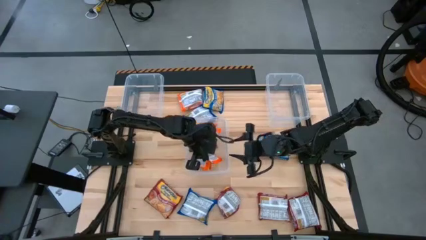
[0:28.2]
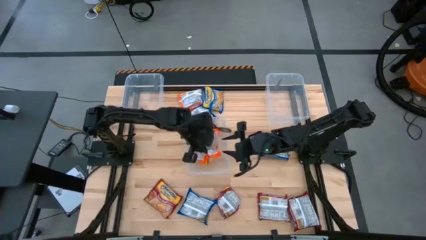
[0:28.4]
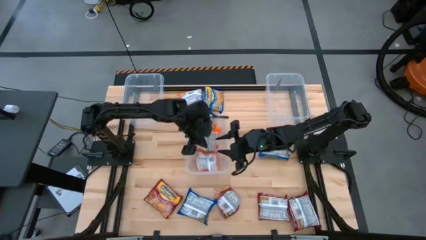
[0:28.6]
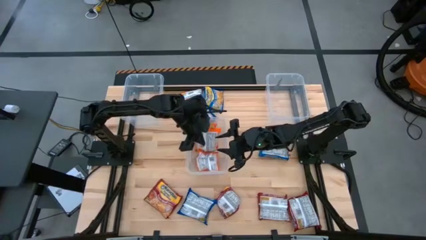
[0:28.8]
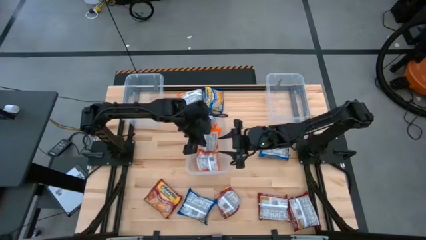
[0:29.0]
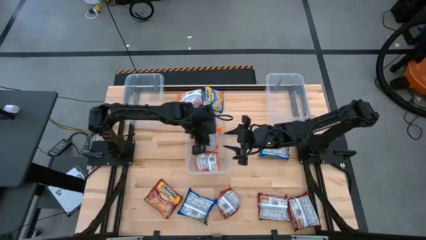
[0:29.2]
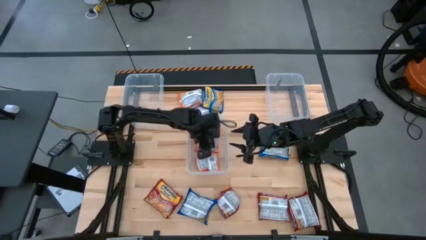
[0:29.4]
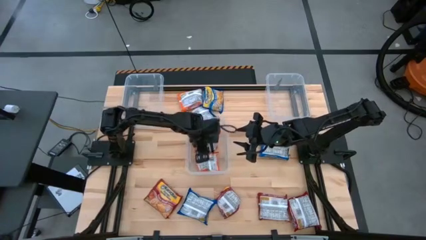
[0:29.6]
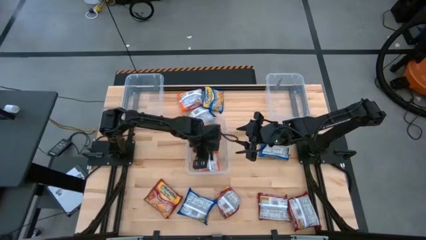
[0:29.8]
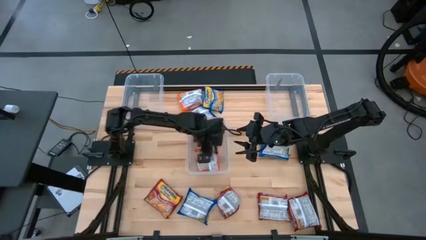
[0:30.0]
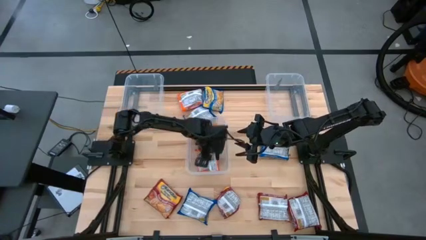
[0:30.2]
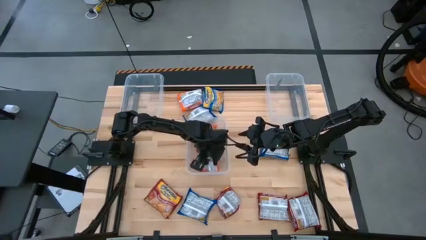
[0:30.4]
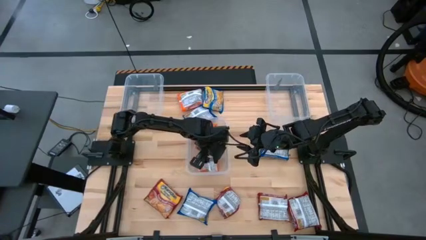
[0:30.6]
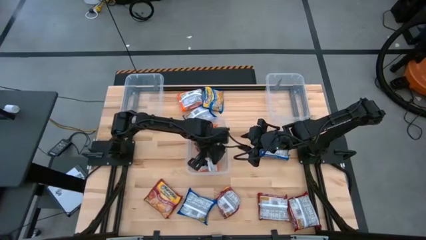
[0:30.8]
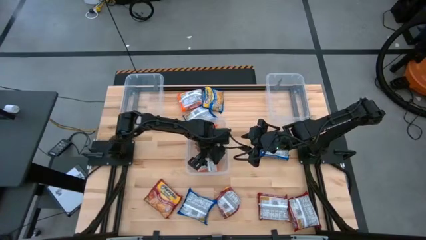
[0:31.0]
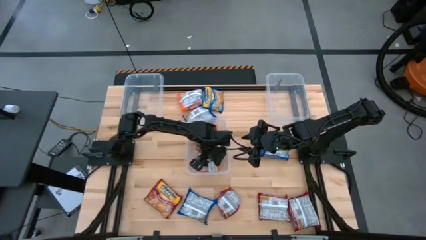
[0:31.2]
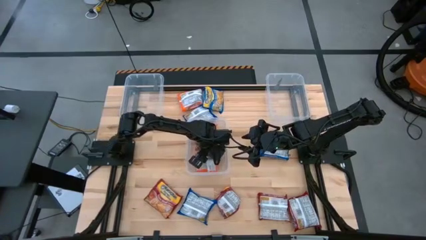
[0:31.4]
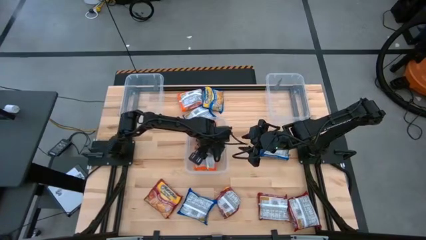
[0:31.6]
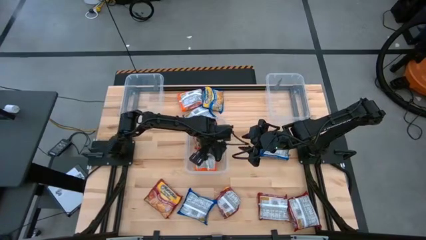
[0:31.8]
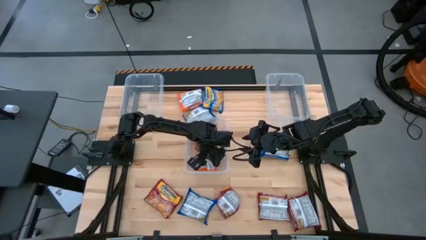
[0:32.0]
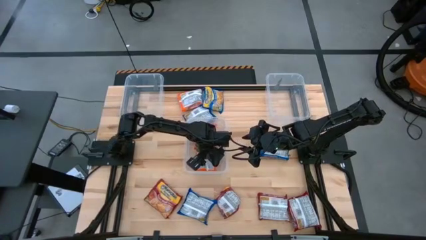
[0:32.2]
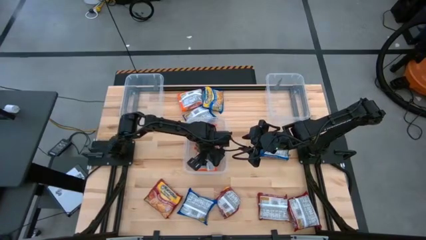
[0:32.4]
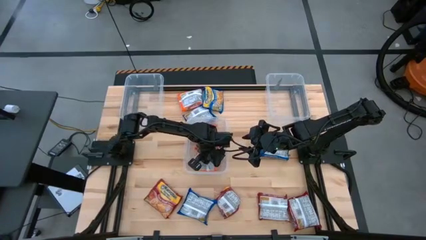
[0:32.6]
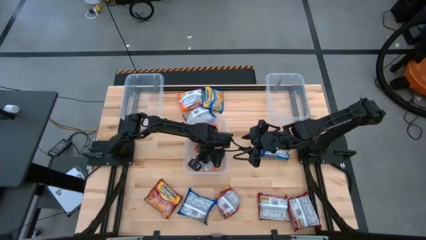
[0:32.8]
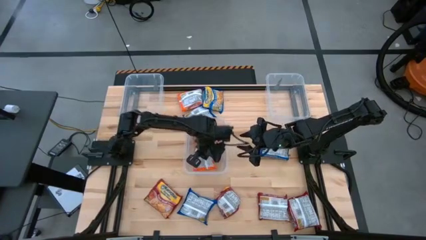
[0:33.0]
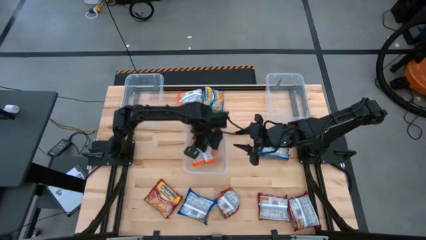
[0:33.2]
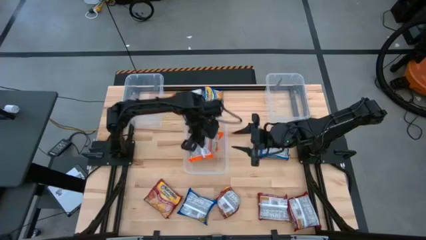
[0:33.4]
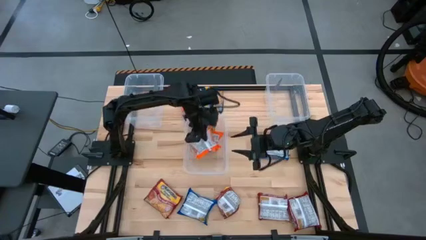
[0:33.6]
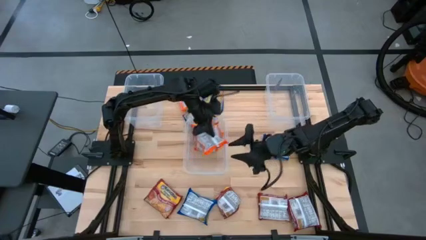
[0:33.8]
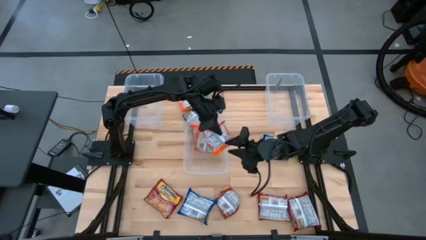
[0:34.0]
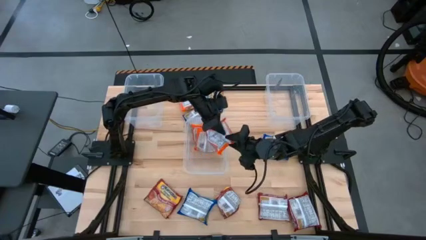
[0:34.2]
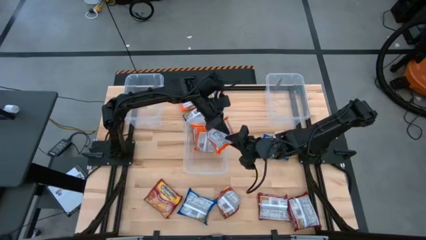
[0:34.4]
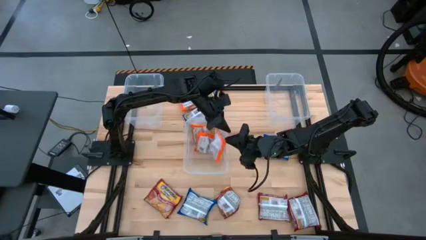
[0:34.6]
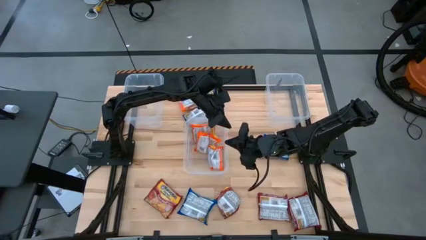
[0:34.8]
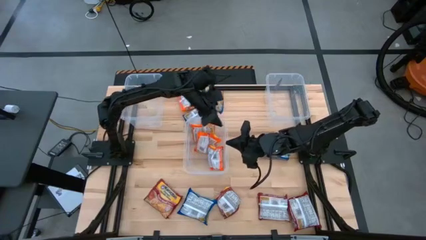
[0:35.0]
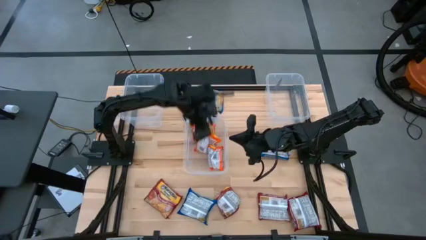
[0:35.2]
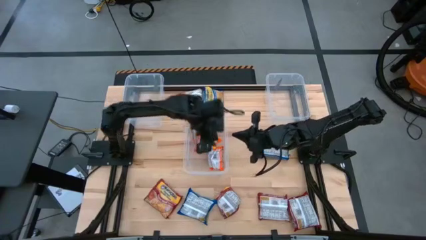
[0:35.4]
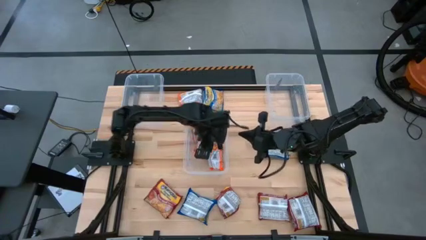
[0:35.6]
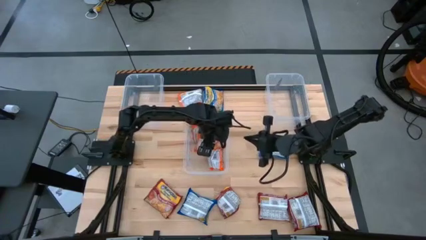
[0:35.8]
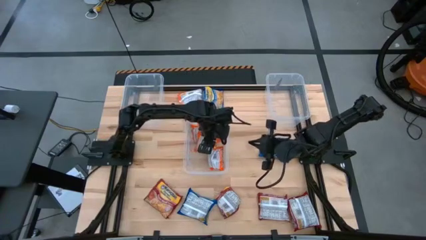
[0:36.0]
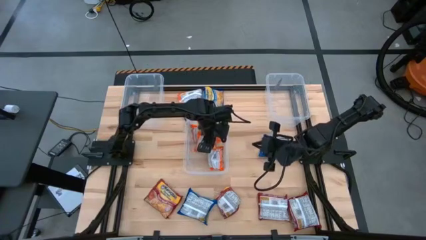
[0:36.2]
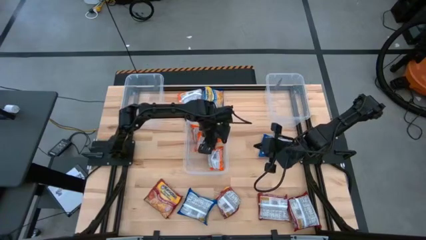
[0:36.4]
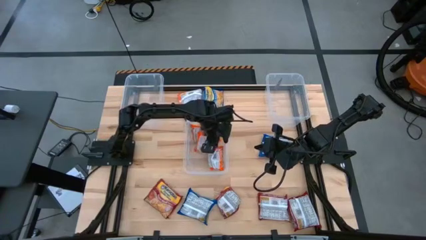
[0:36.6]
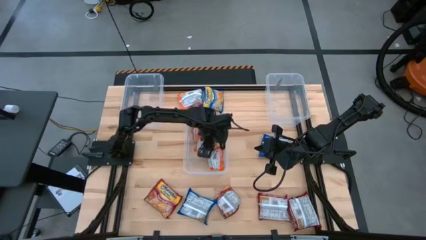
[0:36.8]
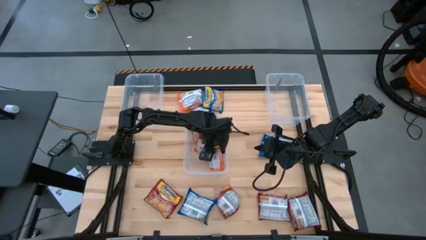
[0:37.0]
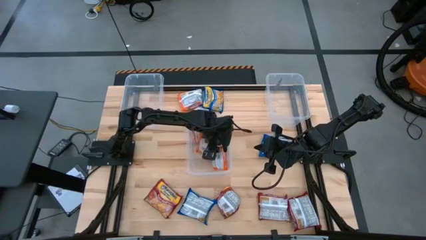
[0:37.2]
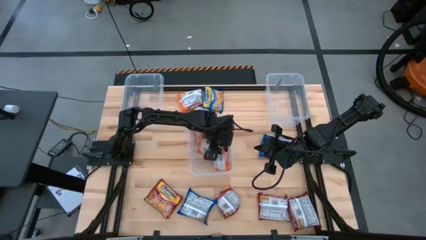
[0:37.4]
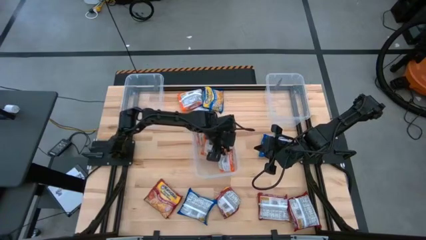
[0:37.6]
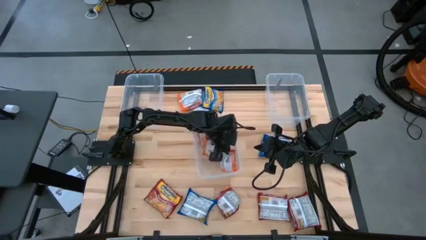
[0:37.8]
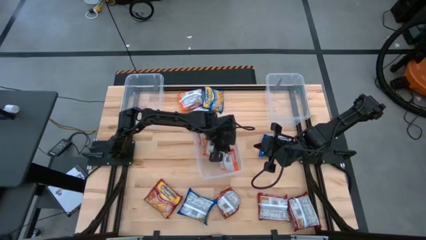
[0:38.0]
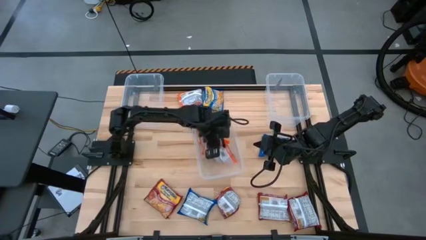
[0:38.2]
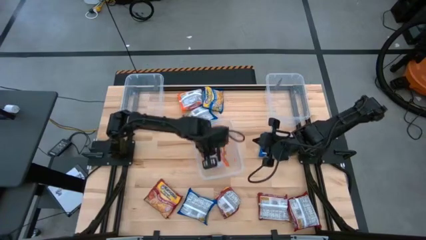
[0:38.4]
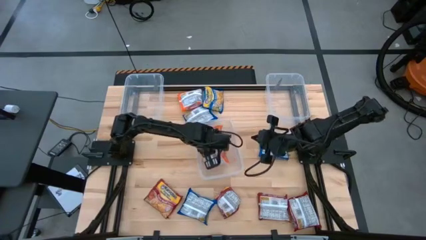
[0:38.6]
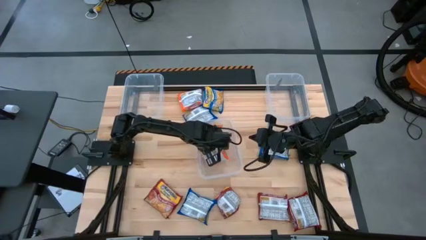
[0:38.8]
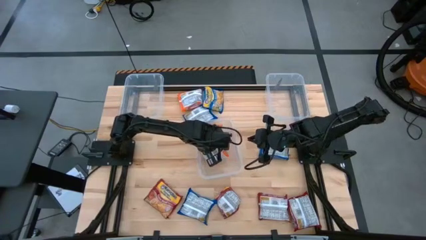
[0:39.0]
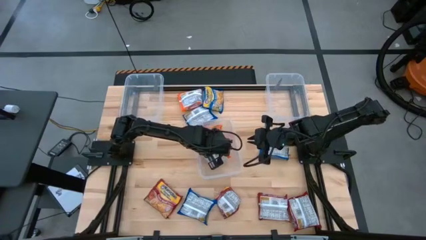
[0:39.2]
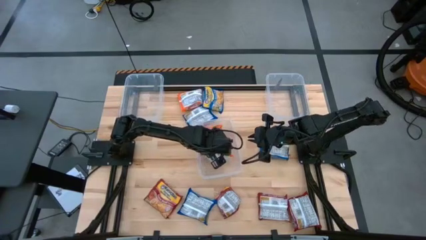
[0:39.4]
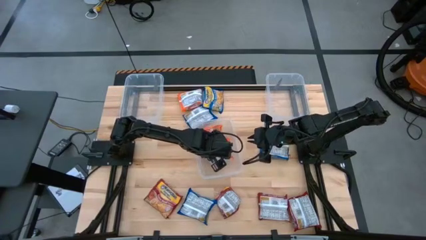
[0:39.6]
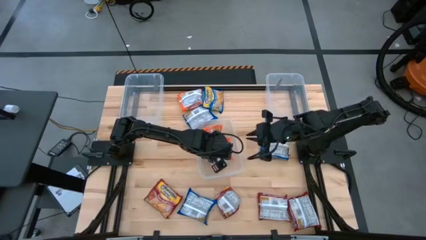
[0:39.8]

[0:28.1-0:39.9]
Task: Sort Maruchan noodles
Put the orange noodle pack into the middle transparent bin
